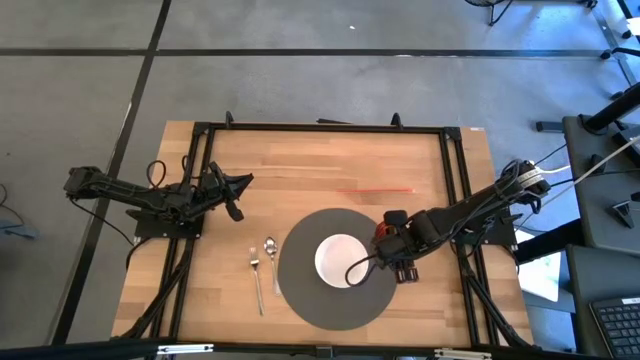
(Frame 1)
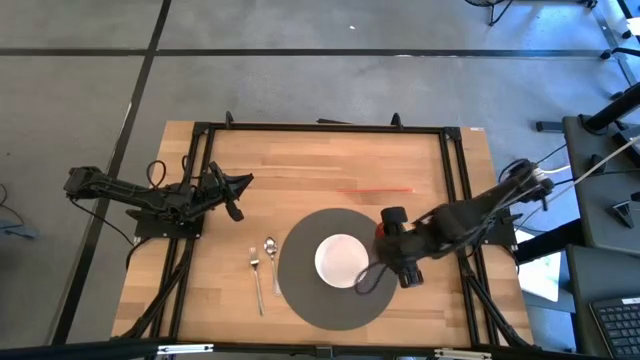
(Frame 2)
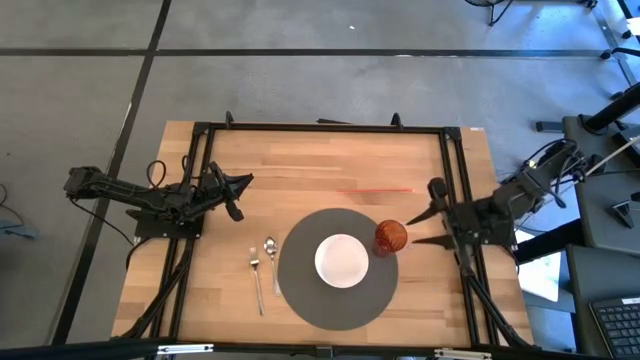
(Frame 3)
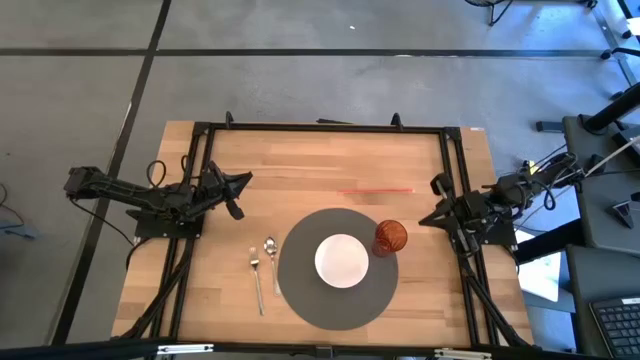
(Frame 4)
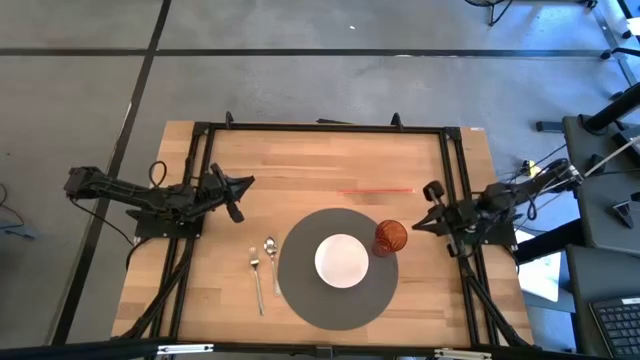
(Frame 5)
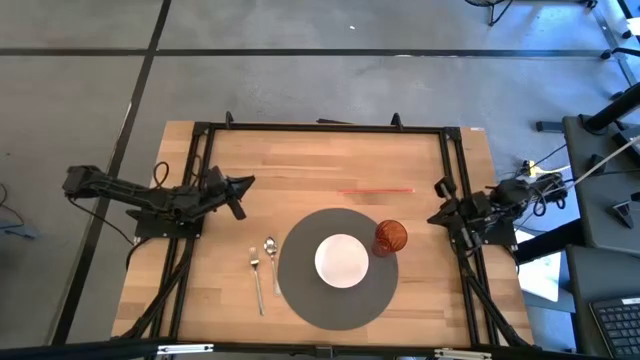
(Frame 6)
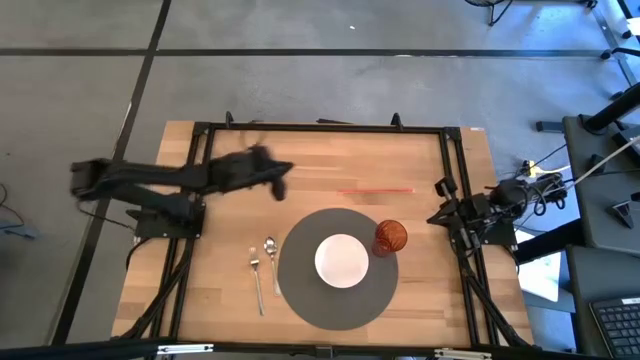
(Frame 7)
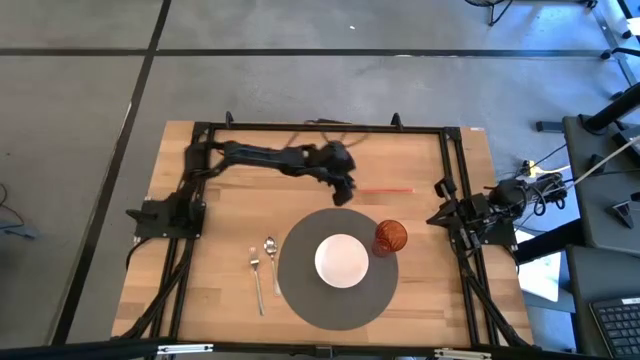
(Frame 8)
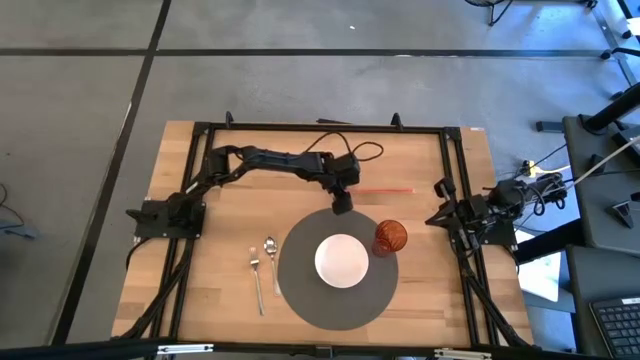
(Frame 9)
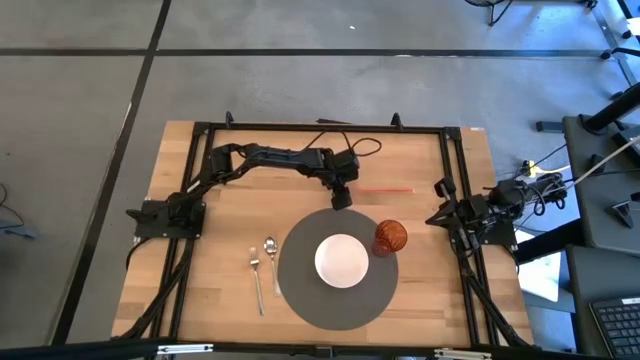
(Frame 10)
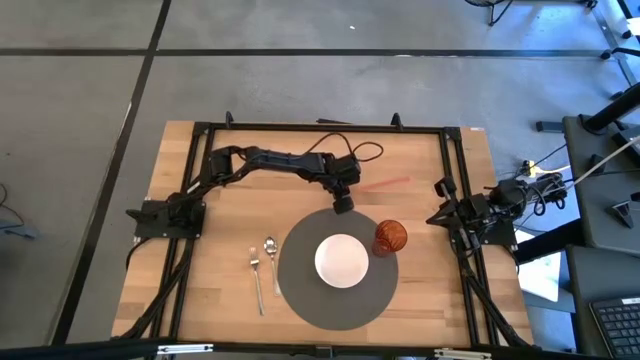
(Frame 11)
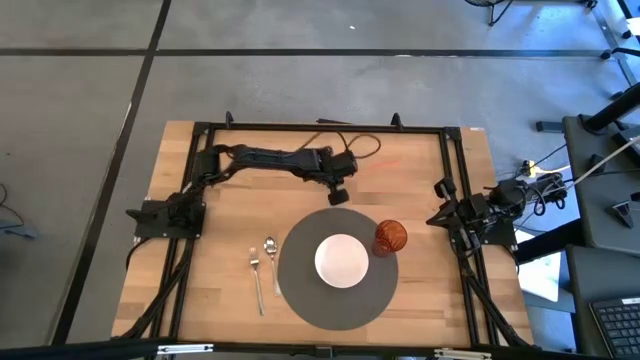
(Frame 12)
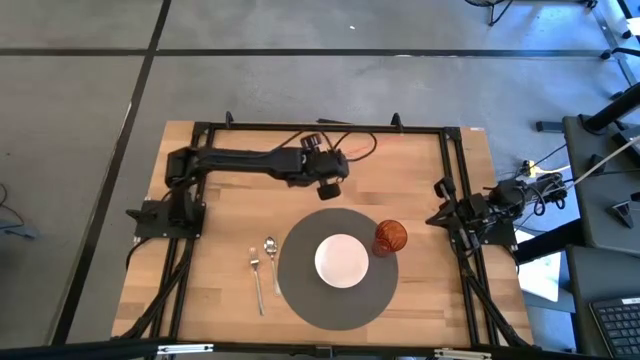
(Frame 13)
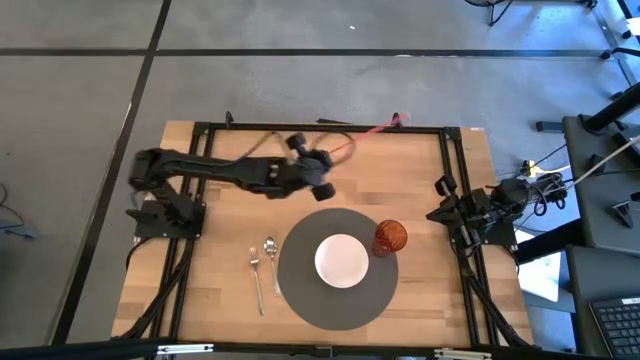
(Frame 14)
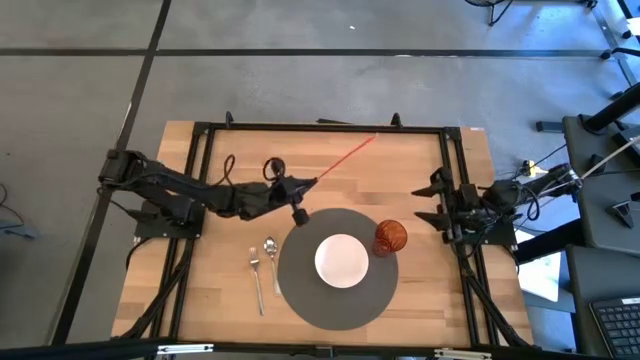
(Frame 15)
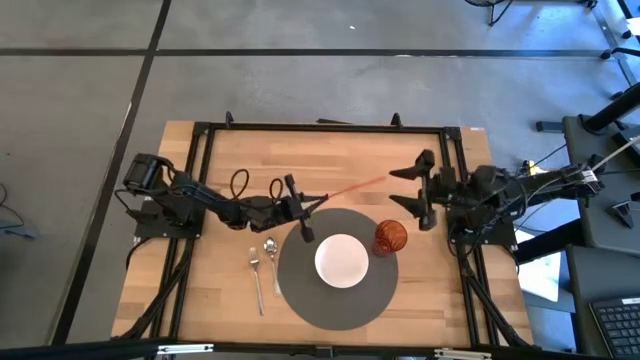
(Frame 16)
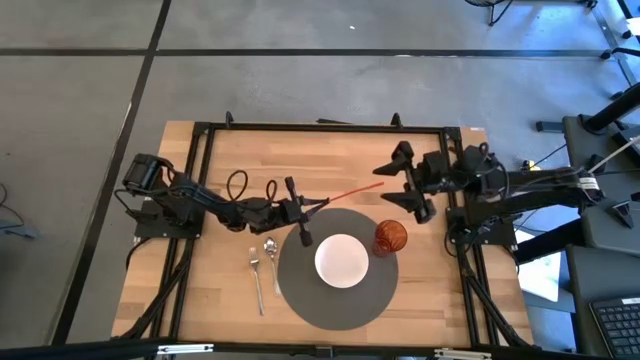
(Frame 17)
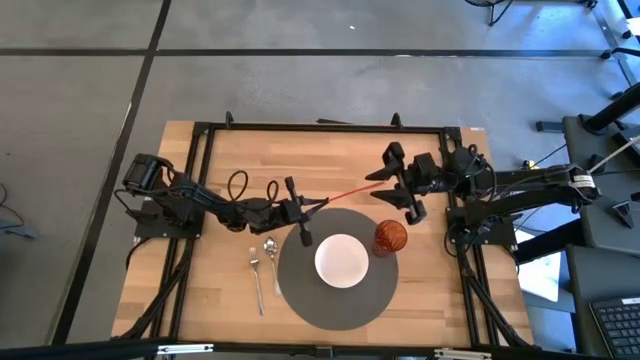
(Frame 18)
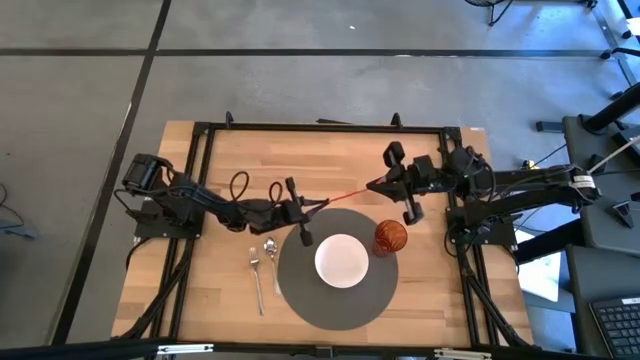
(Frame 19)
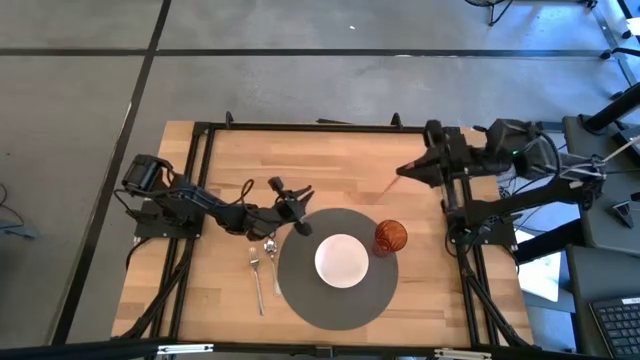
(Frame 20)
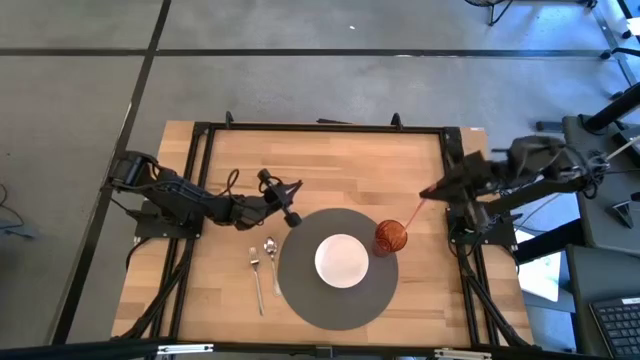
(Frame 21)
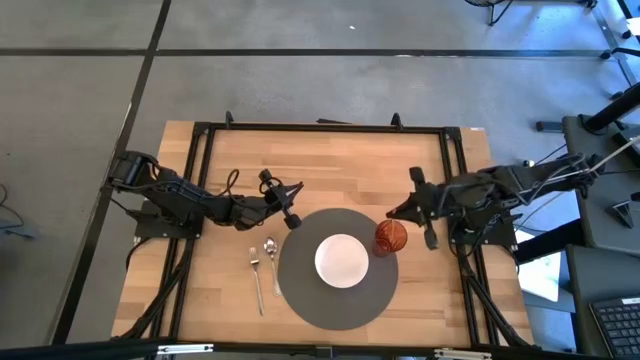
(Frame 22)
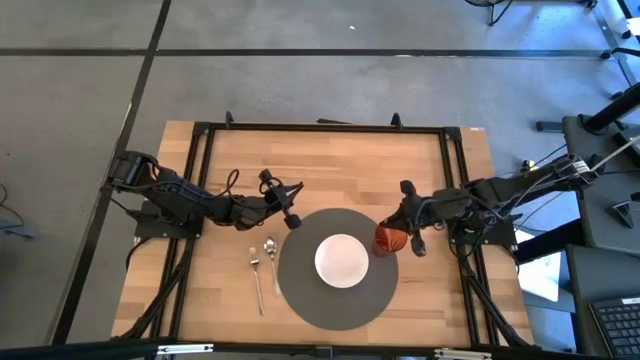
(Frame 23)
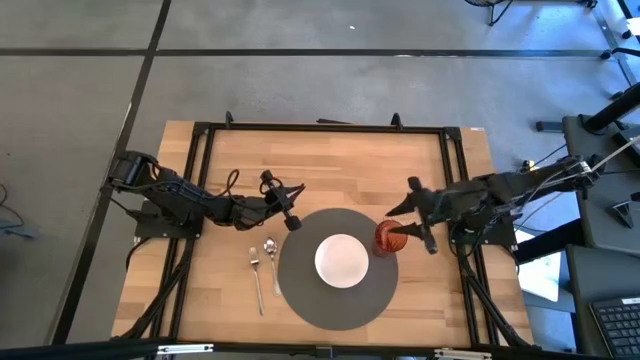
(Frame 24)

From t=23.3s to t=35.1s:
Task: Pick & Place Utensil
Put the orange straw into the orange glass to the right of the white bowl

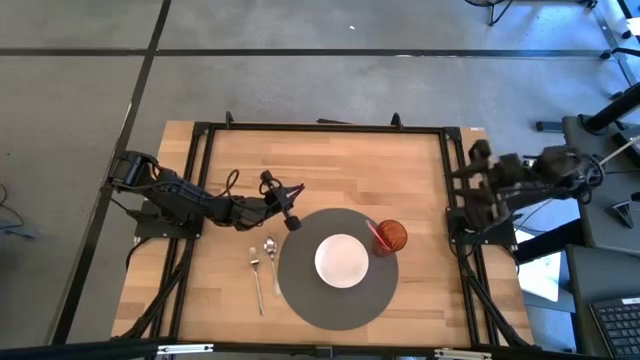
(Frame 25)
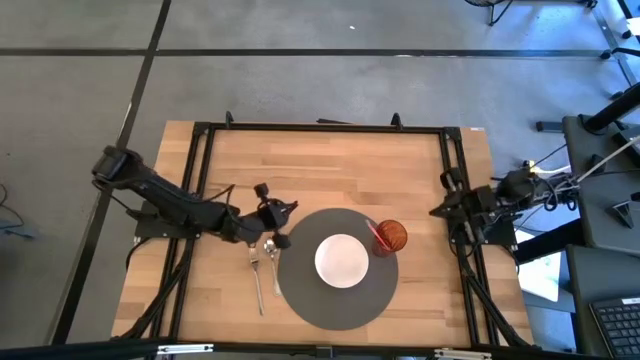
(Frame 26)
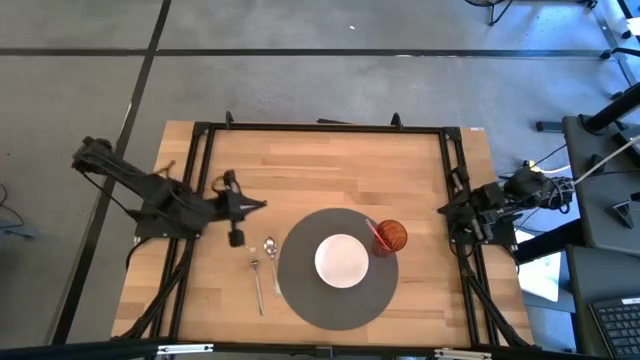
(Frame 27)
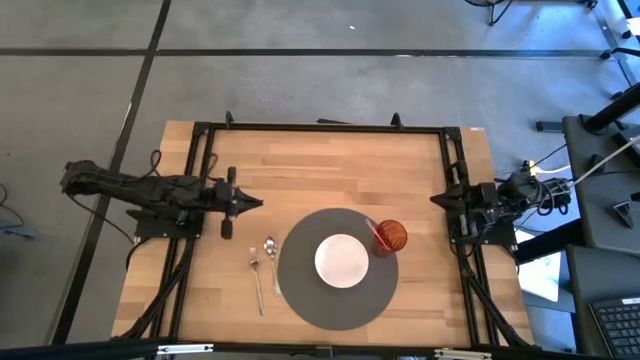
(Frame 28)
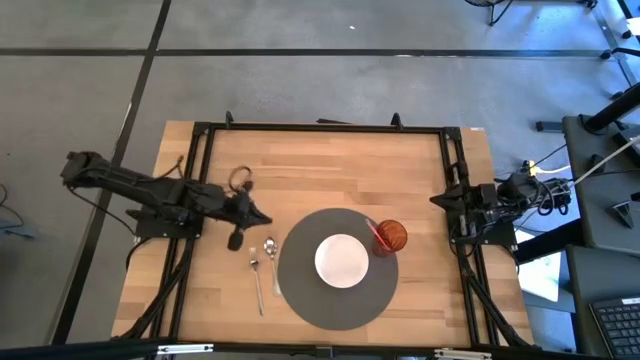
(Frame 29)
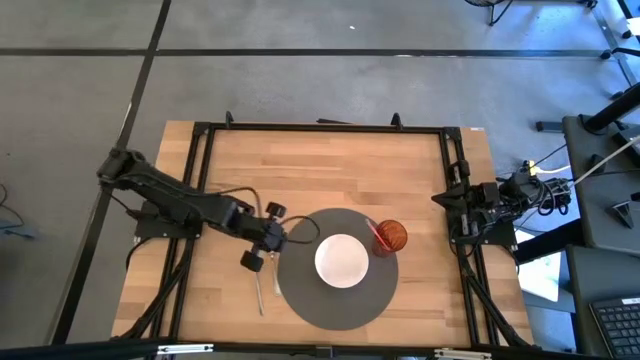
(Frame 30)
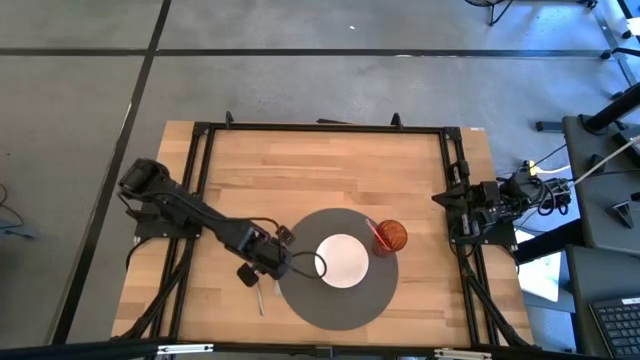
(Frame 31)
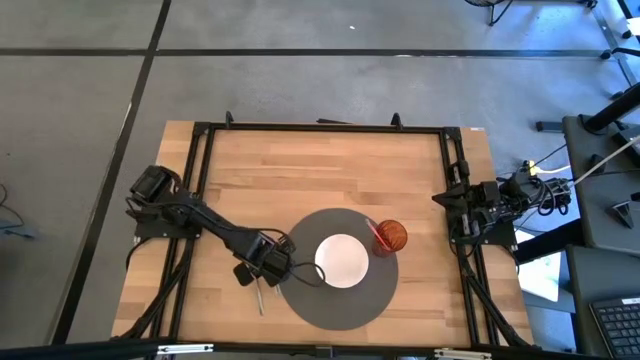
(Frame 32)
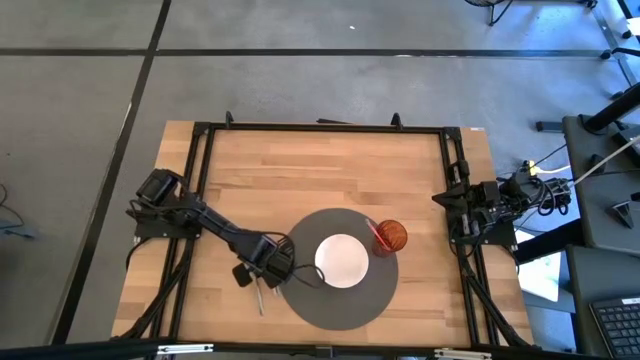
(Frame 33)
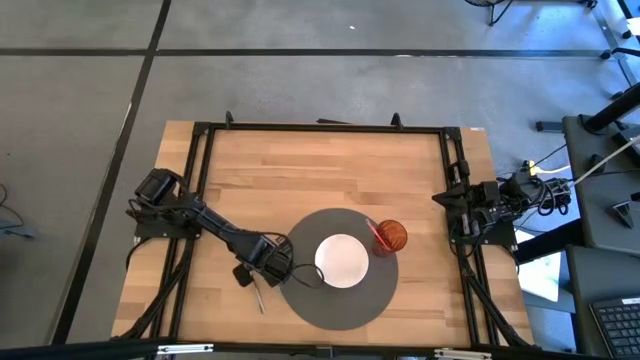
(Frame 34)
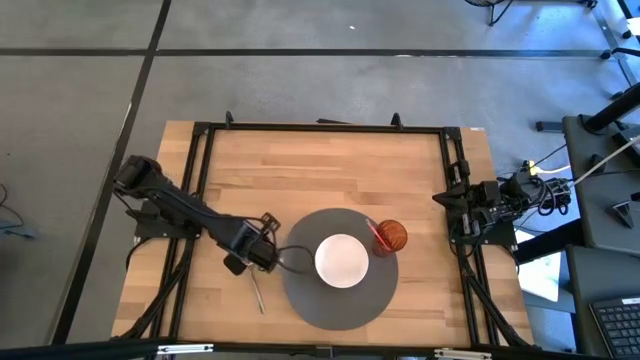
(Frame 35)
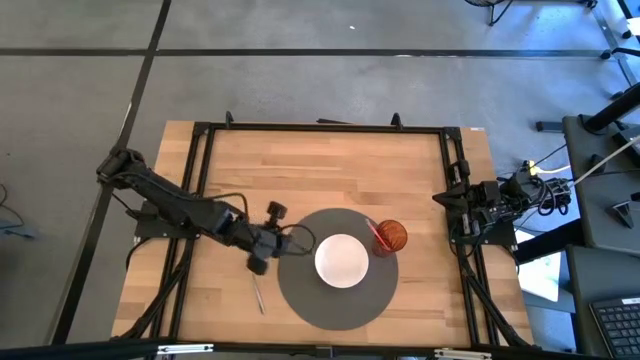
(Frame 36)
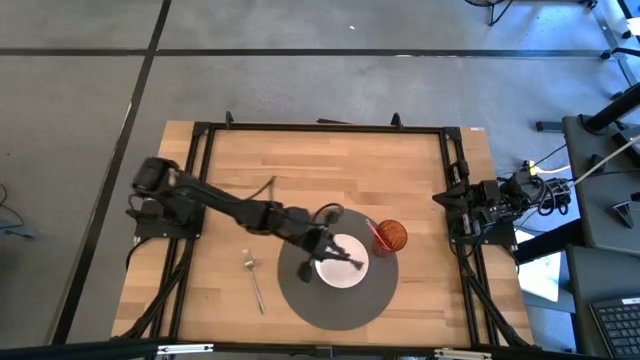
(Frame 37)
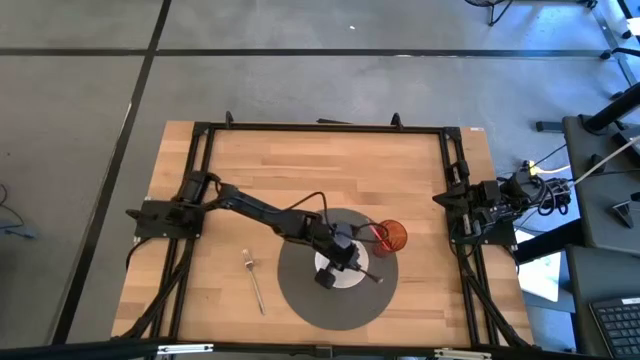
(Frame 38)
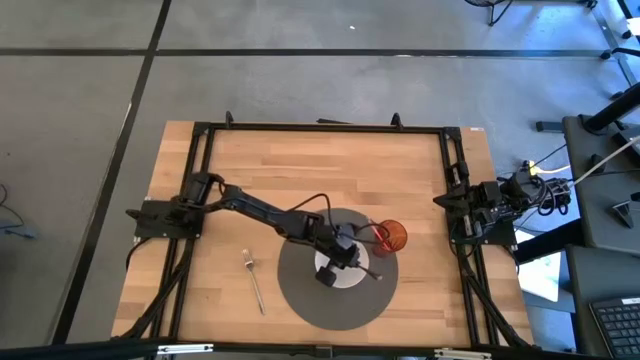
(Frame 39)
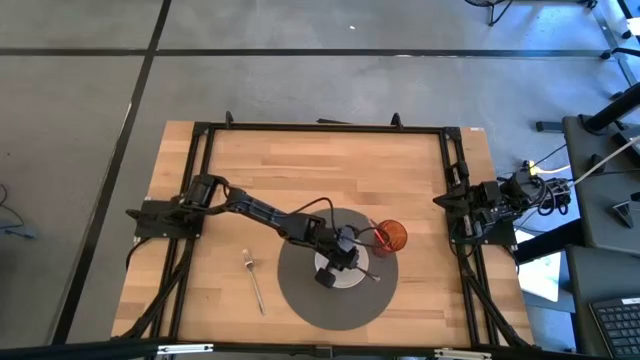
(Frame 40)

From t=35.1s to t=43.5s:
Put the silver spoon into the white bowl to the left of the orange glass

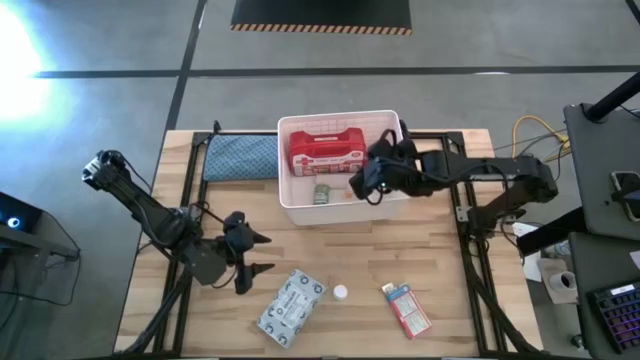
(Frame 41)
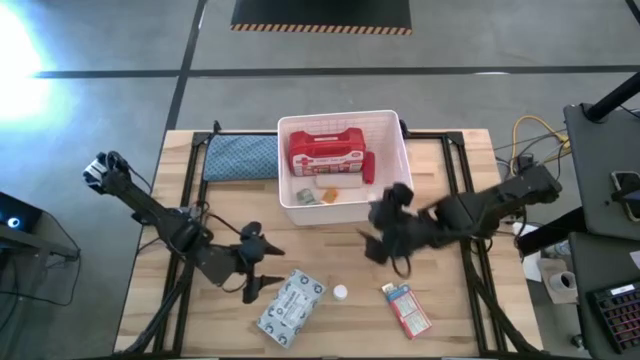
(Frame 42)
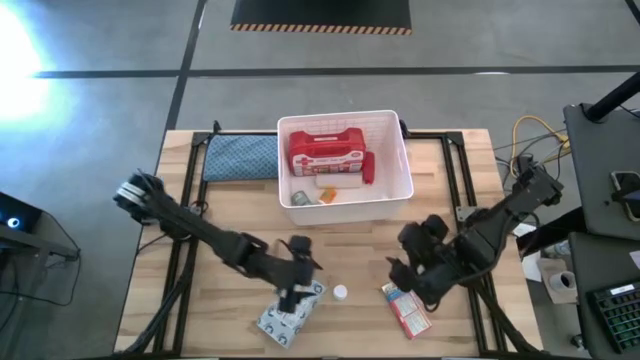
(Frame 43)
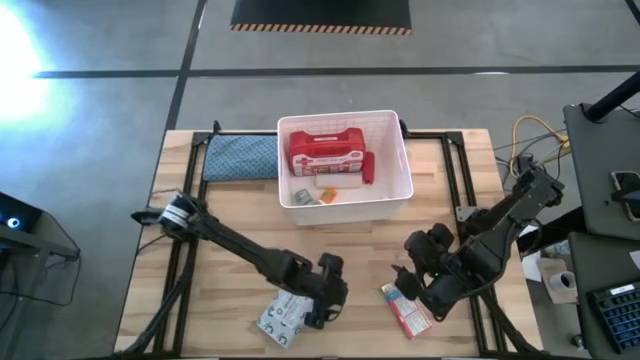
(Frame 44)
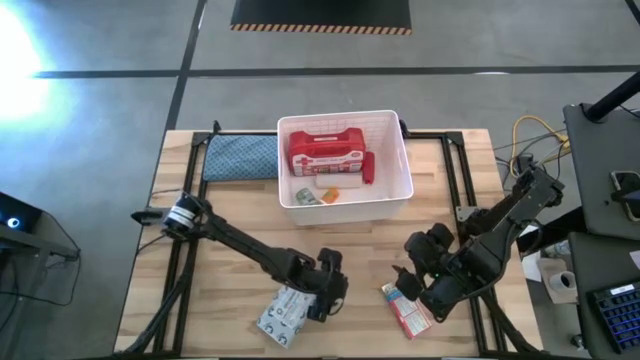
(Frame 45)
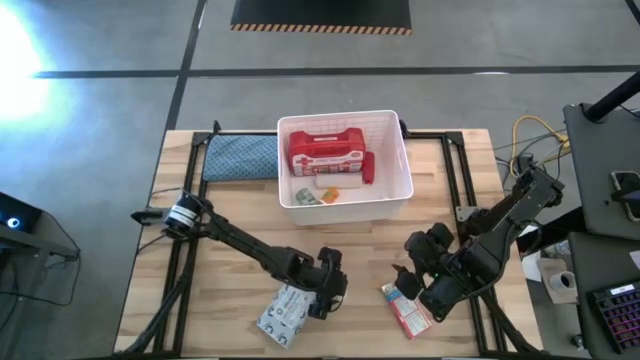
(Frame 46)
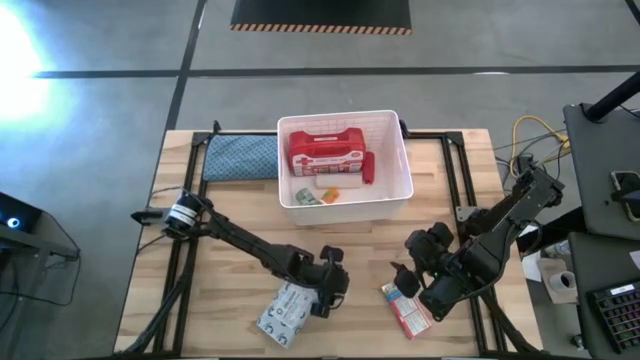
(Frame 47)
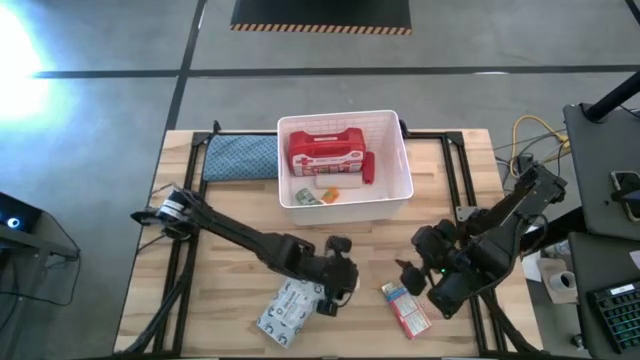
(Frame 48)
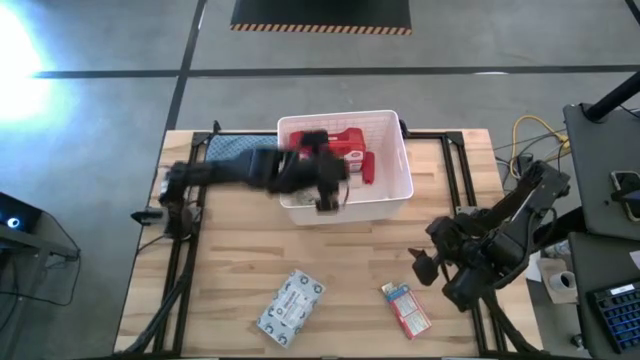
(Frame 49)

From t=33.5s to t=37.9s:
Task: Pick & place medical supplies in basket/bin
Put the white medicine bottle into the bin
